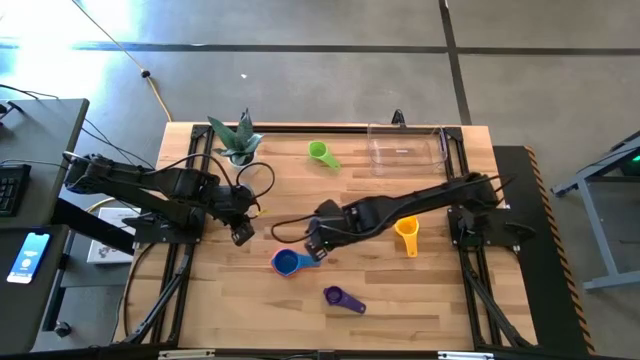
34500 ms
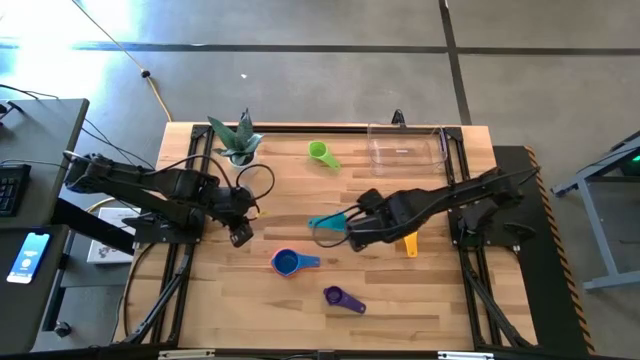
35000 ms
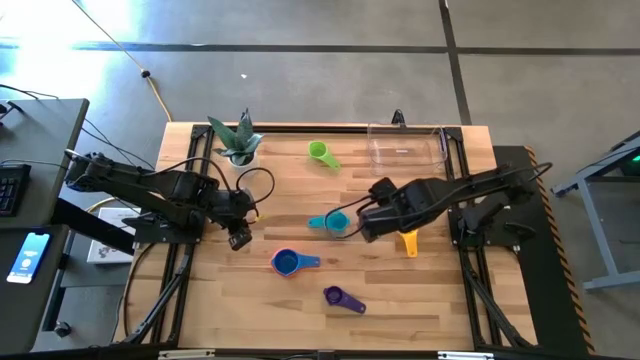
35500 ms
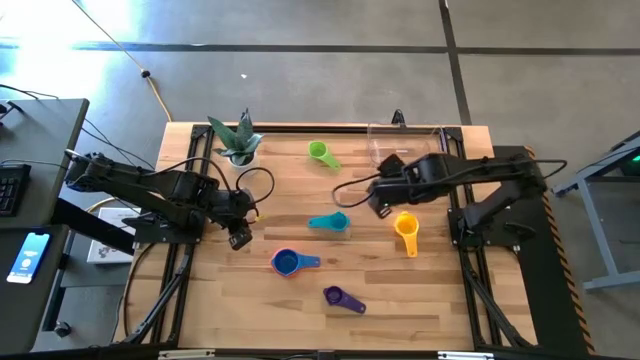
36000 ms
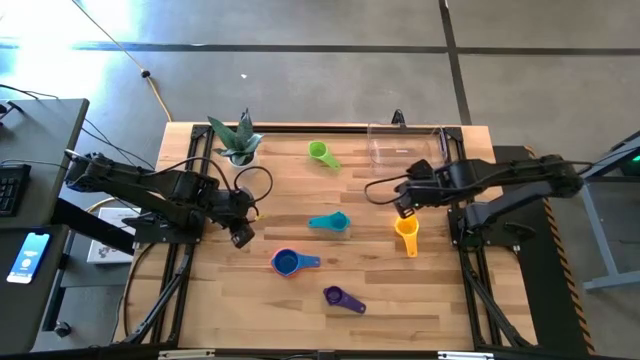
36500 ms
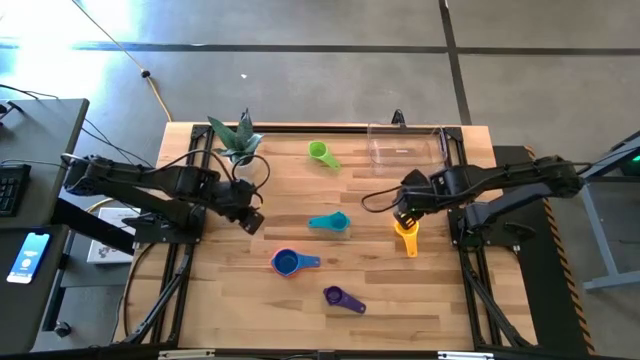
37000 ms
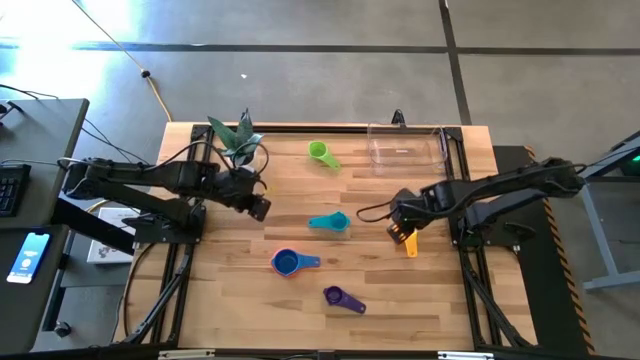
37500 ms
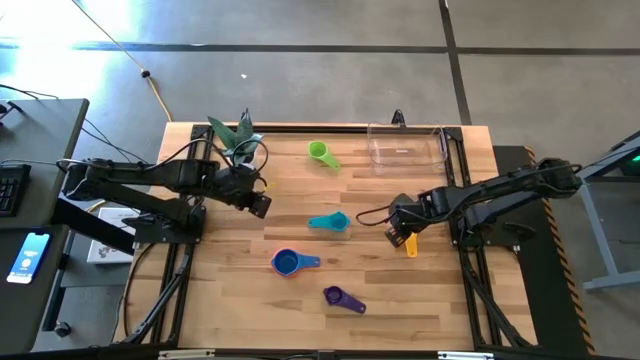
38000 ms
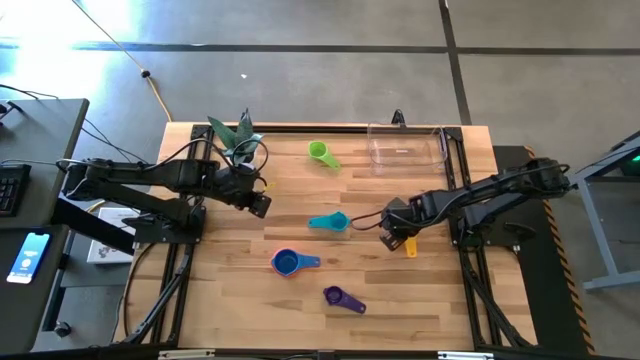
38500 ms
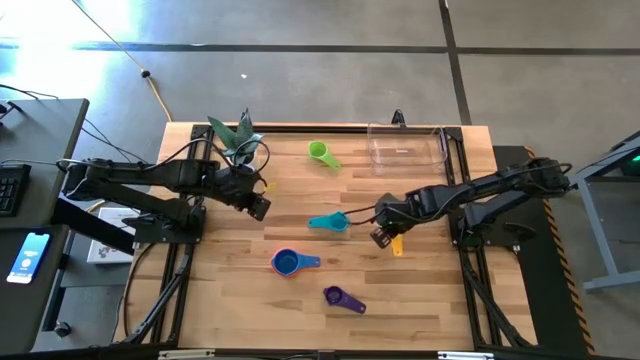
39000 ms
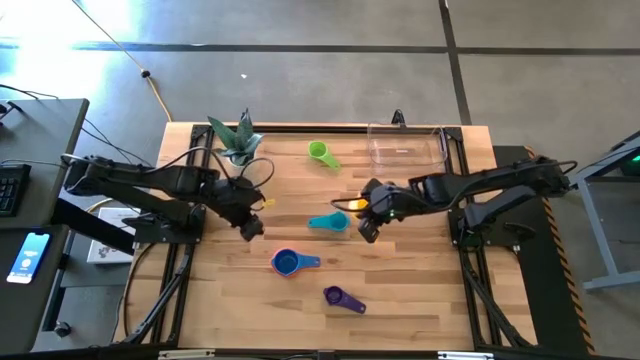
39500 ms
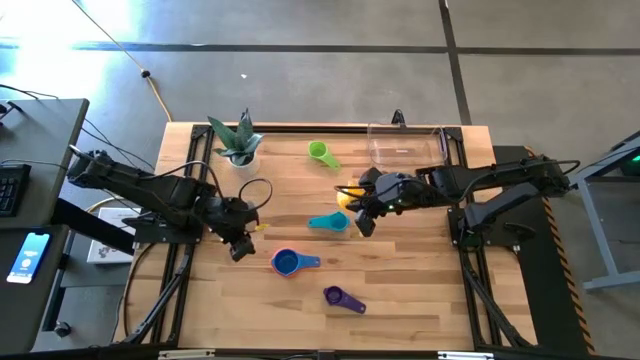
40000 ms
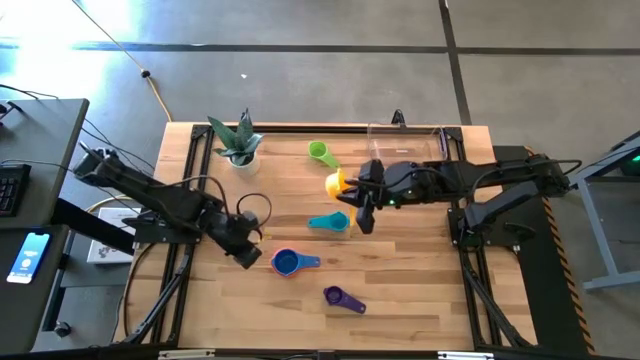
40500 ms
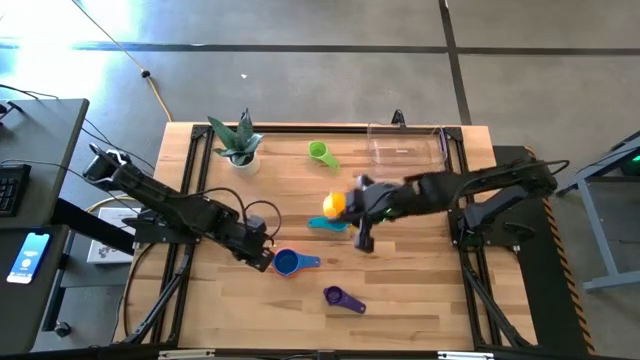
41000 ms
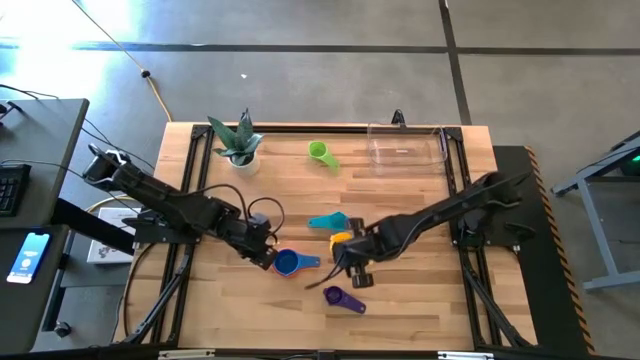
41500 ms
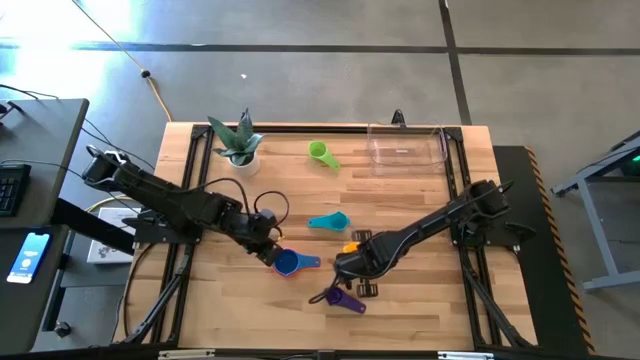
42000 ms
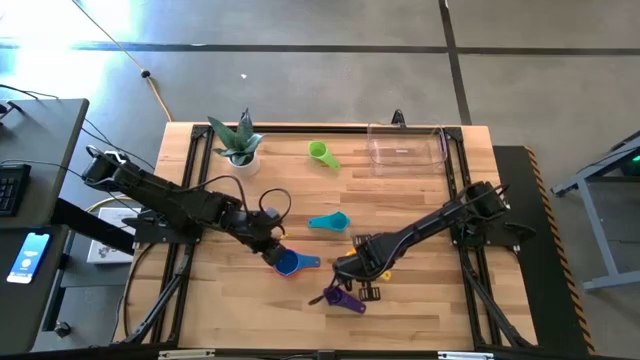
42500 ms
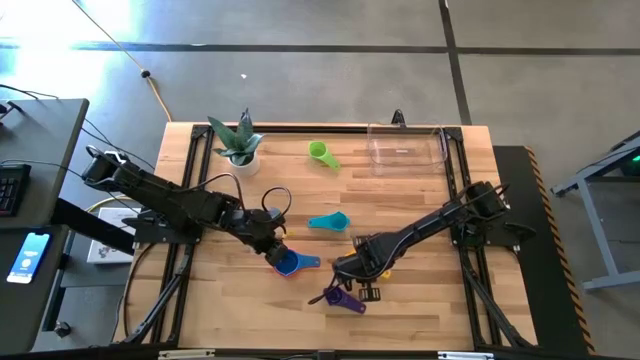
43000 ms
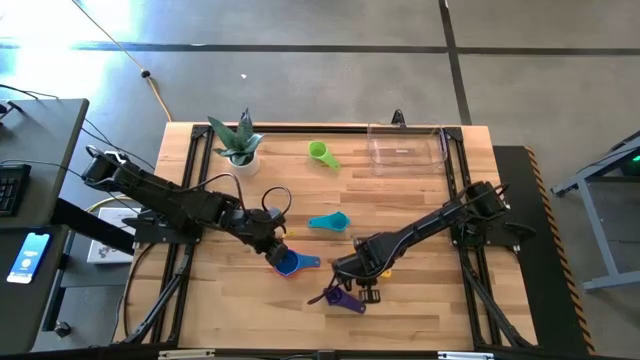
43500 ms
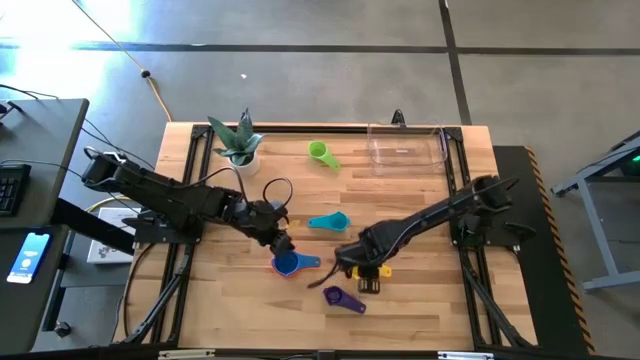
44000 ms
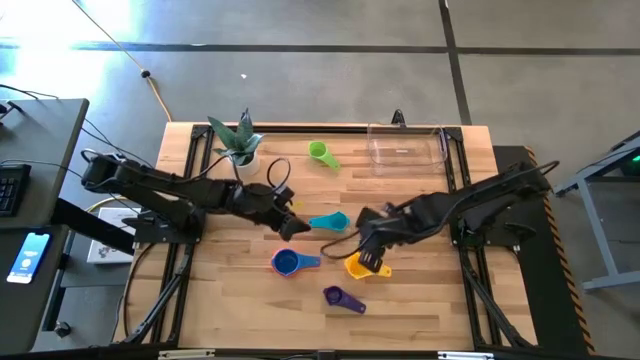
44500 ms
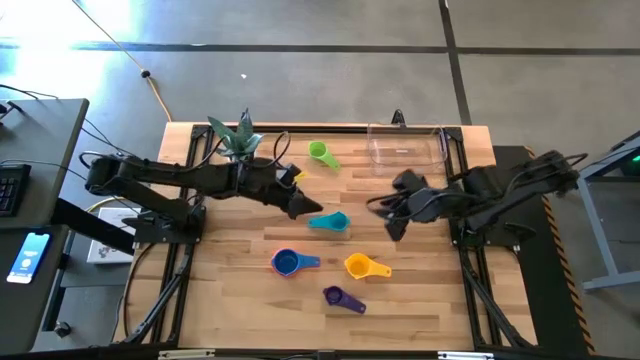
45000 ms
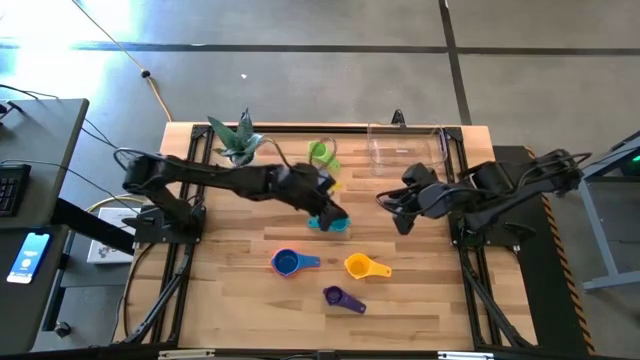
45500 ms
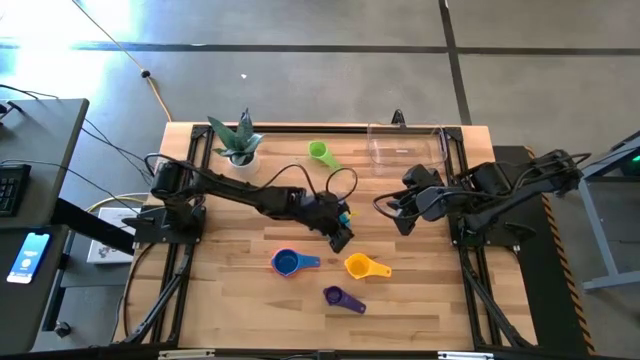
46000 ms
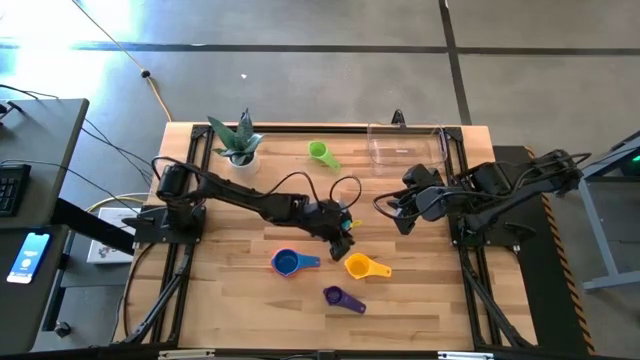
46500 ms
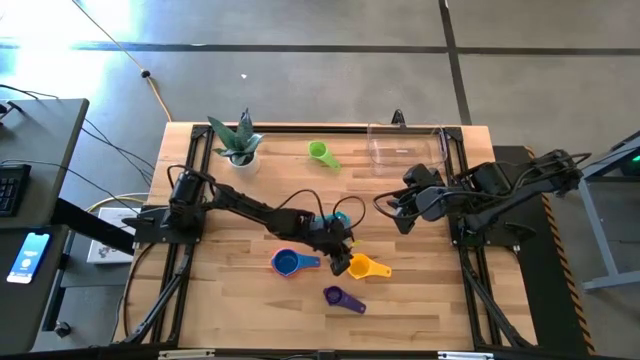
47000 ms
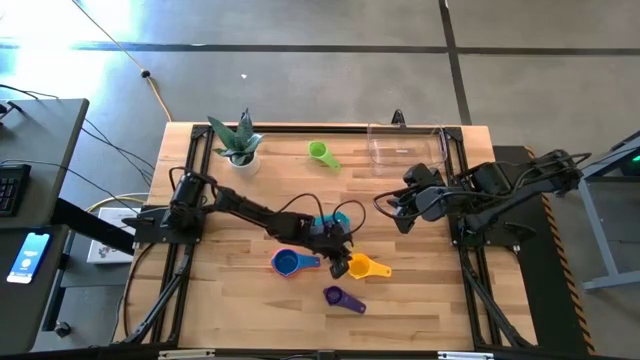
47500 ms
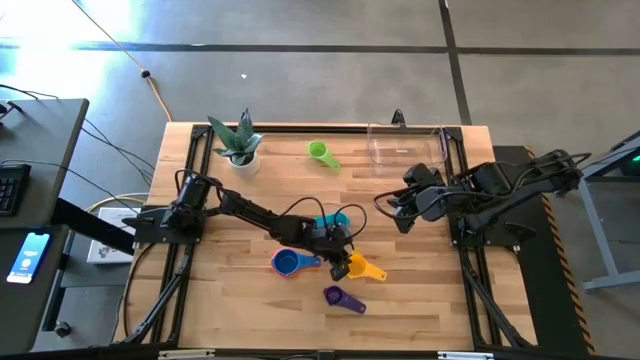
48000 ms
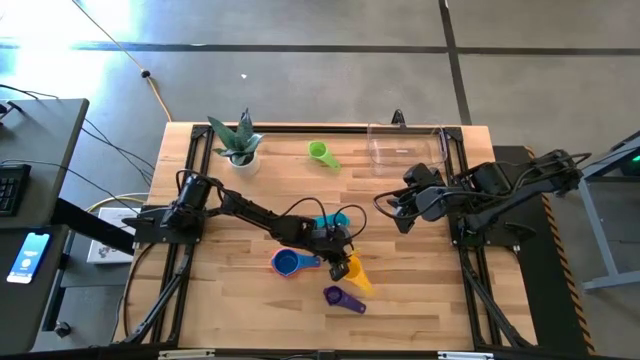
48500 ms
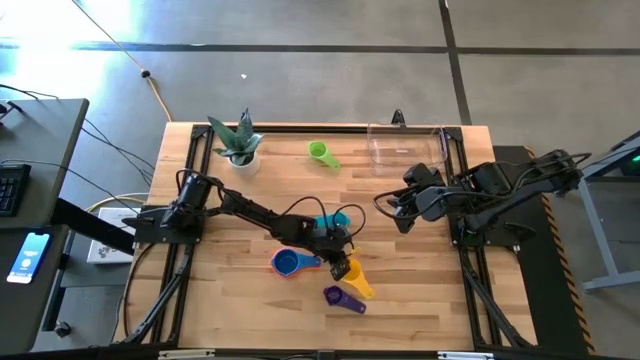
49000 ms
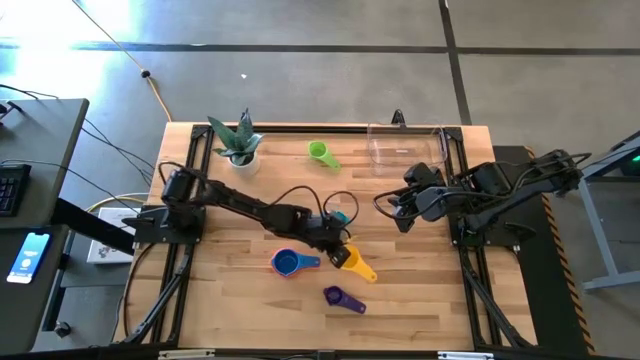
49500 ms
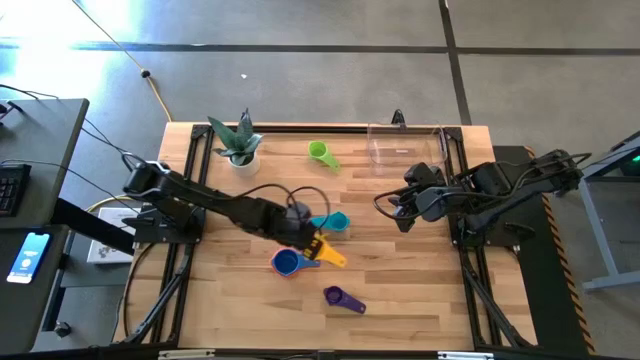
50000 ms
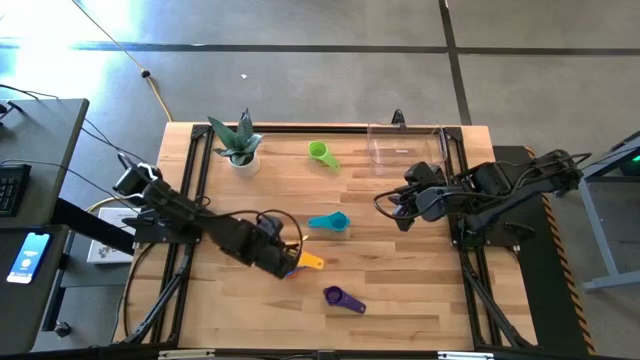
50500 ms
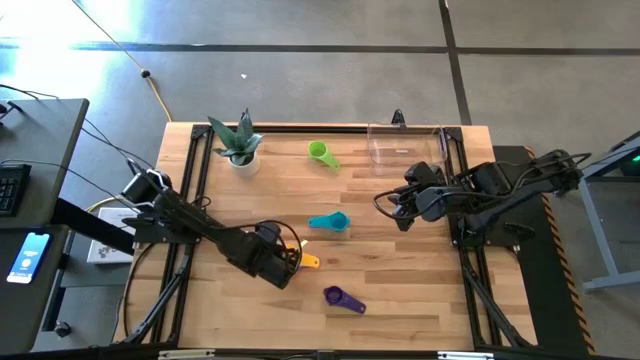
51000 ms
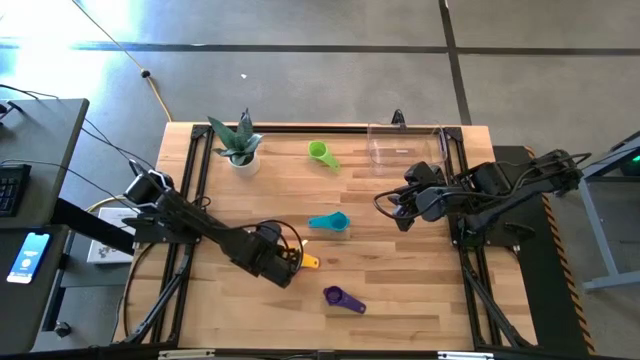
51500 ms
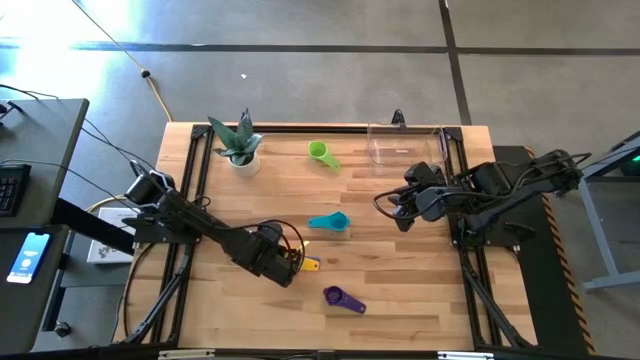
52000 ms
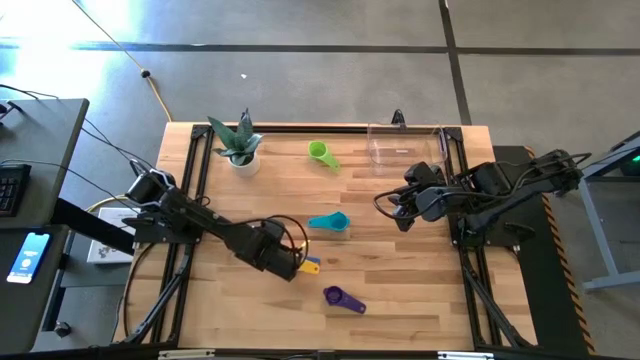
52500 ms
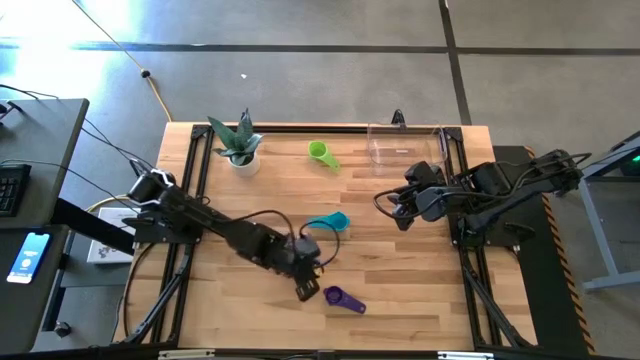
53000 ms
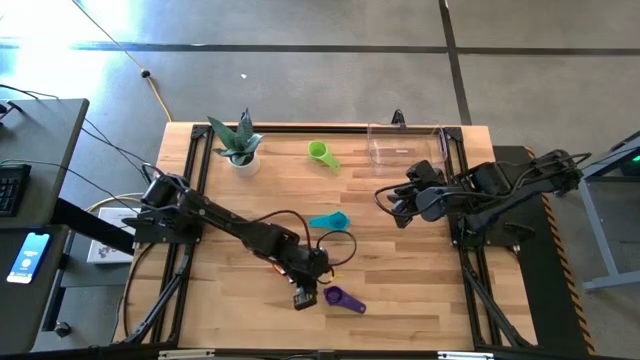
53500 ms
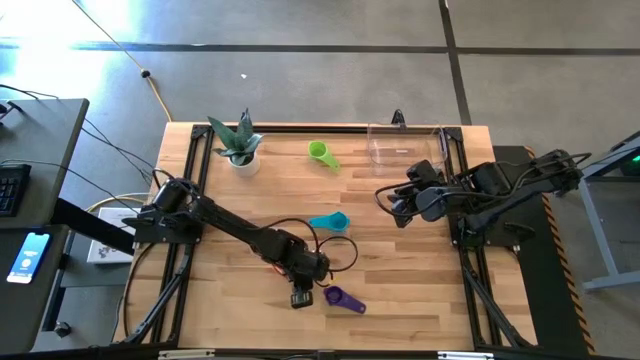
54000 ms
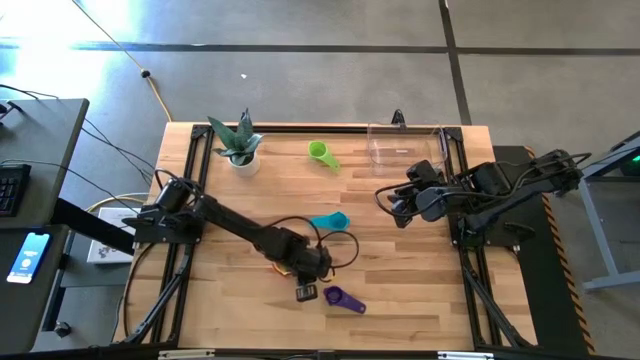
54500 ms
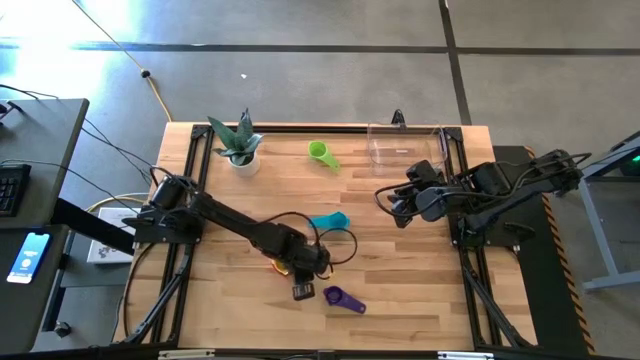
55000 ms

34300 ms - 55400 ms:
Task: Nest measuring cups in basket
Stack the yellow measuring cup into the blue measuring cup
